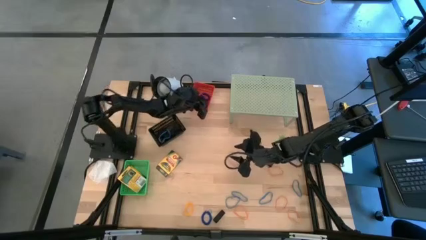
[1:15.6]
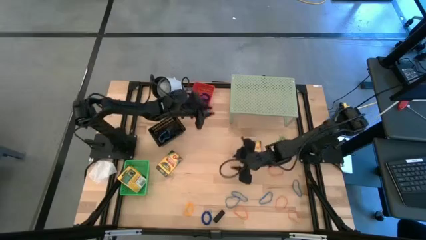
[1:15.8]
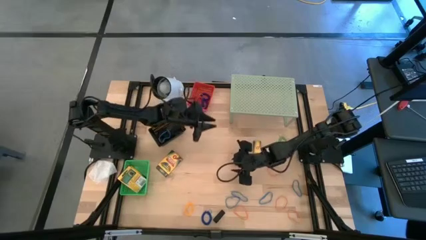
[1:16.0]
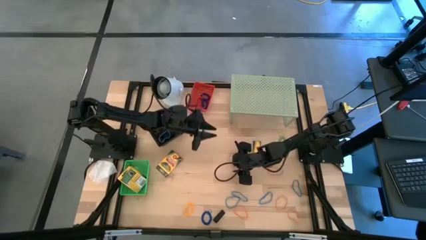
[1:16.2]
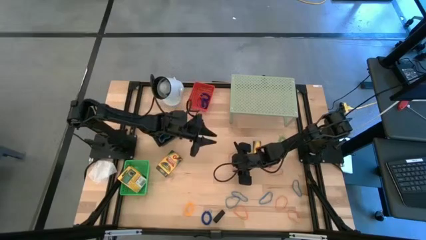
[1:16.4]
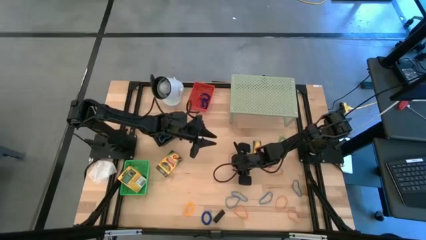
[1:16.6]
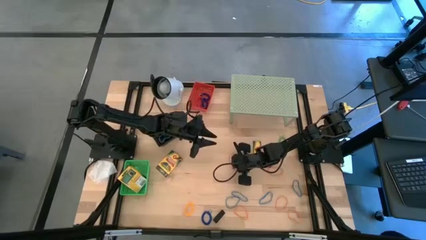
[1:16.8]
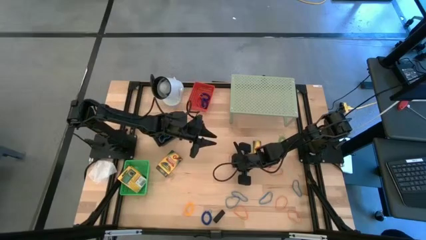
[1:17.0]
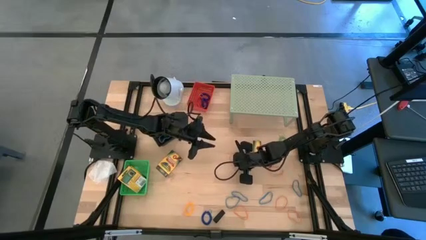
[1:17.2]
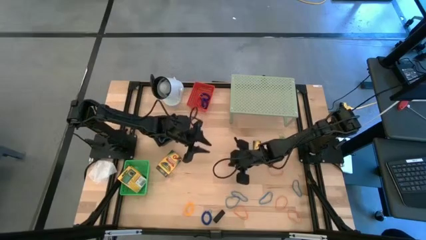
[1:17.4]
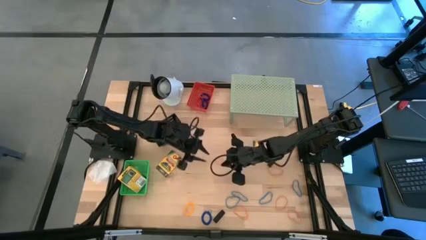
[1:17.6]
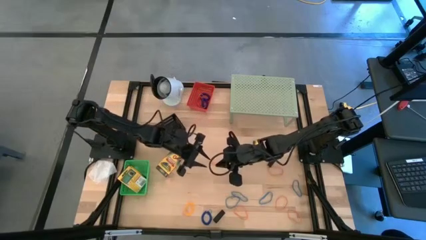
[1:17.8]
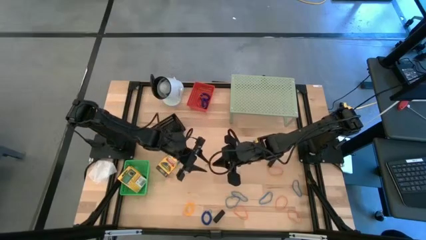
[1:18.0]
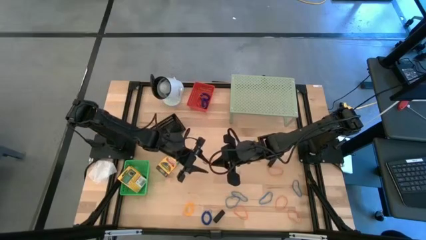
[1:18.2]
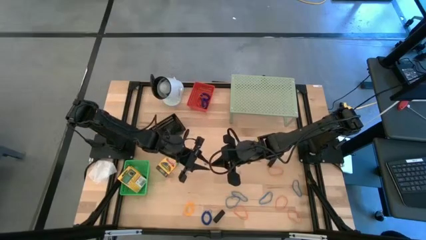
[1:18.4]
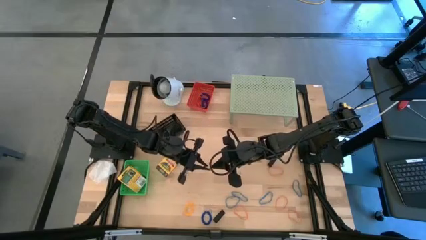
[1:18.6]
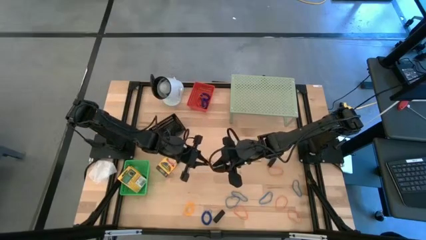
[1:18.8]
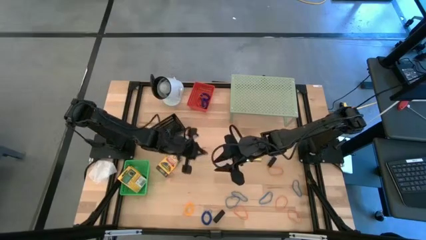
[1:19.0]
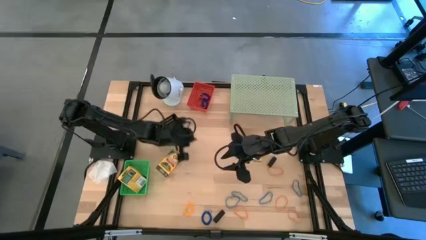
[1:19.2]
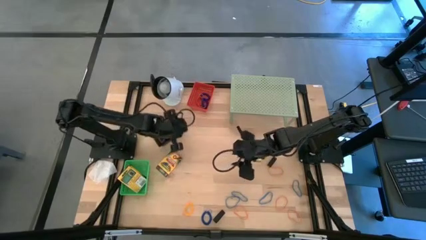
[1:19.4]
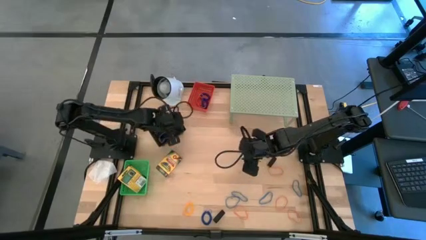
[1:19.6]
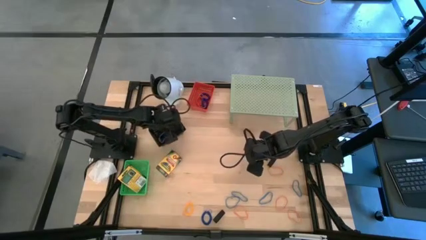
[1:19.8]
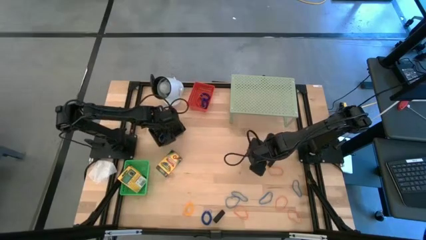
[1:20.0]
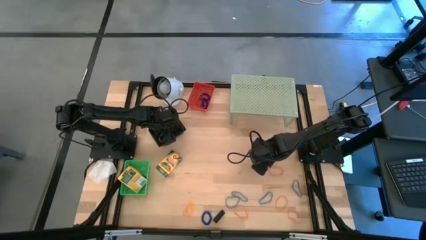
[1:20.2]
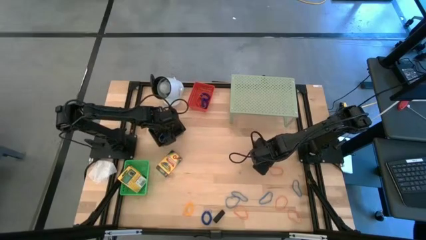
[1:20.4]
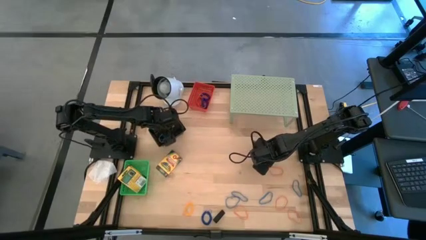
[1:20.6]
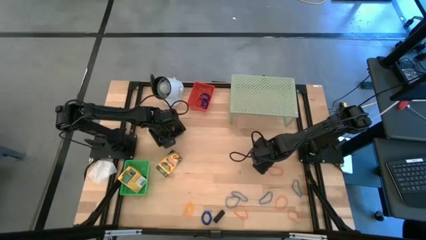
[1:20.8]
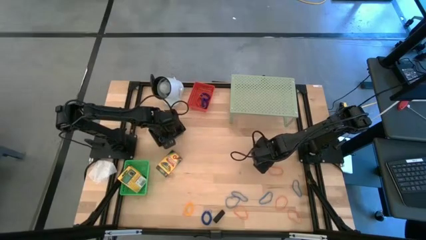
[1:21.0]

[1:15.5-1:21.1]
Task: Pick & Place Office Desk Supplies
Put the orange rubber band into the black bin

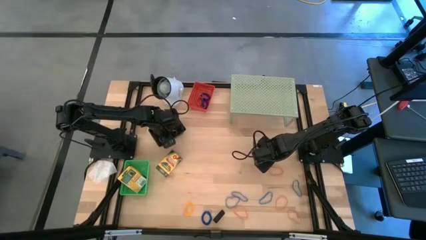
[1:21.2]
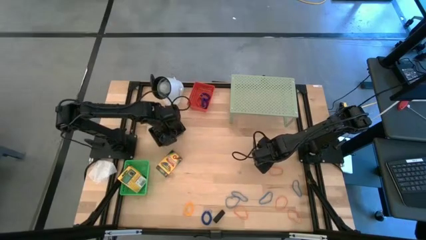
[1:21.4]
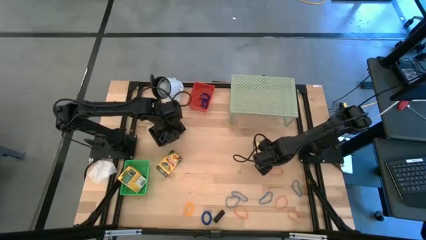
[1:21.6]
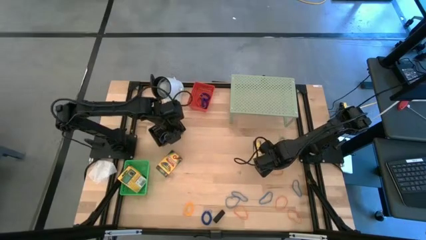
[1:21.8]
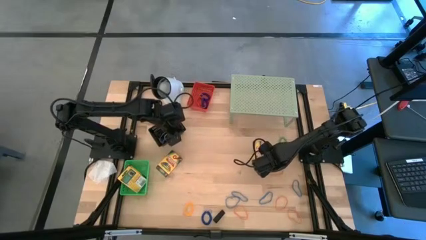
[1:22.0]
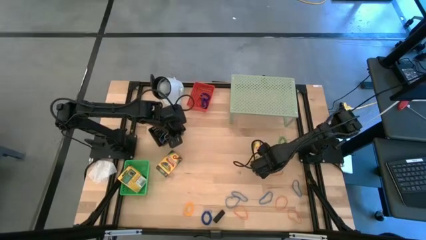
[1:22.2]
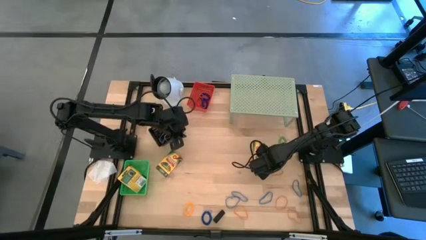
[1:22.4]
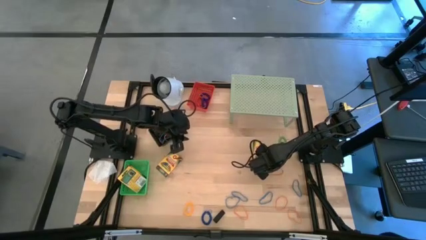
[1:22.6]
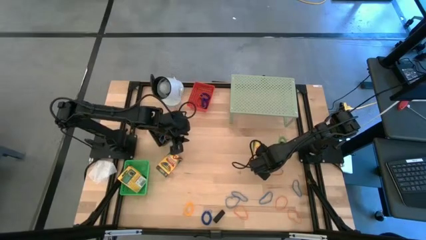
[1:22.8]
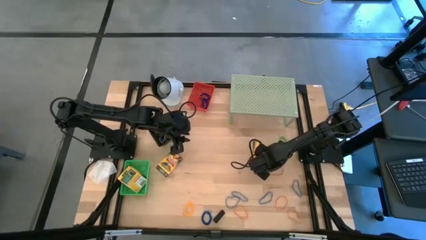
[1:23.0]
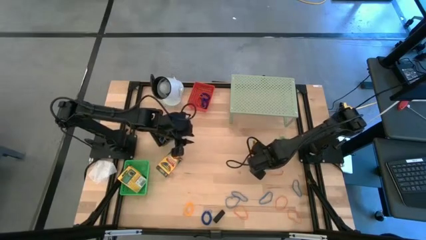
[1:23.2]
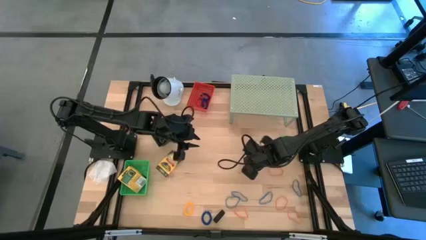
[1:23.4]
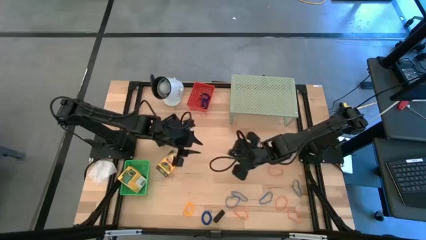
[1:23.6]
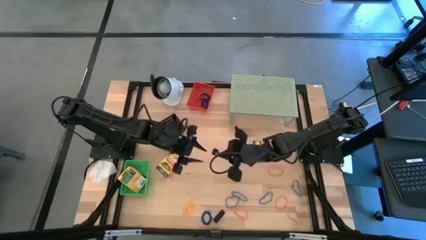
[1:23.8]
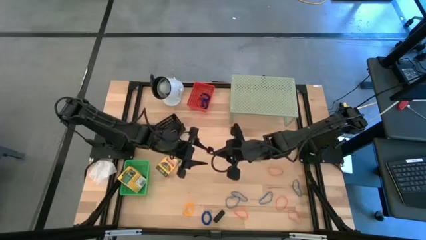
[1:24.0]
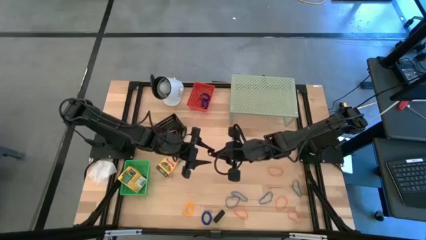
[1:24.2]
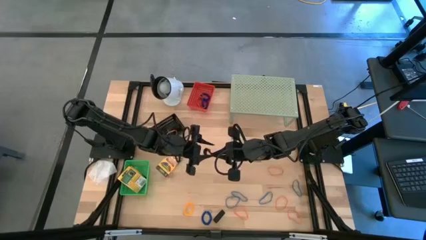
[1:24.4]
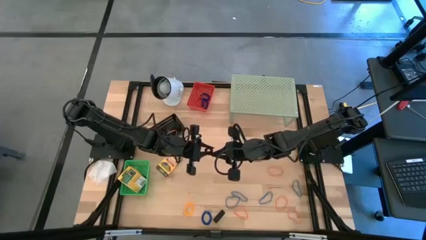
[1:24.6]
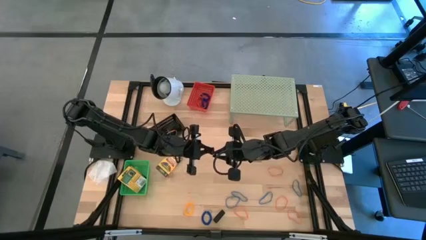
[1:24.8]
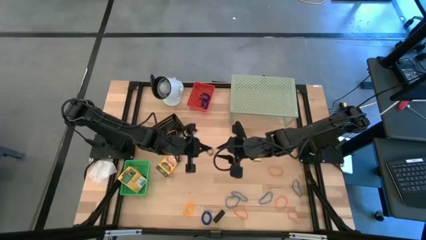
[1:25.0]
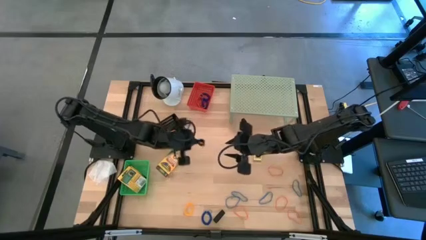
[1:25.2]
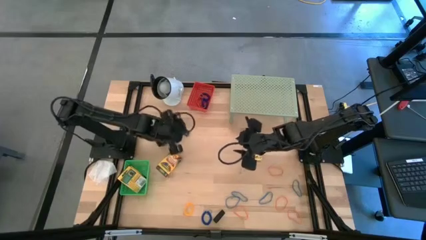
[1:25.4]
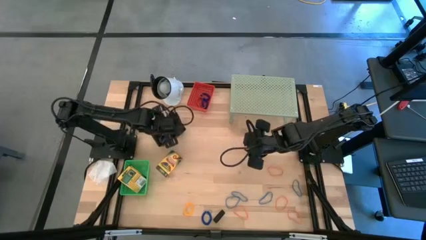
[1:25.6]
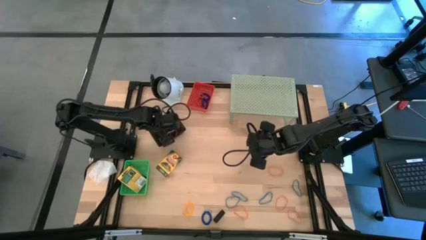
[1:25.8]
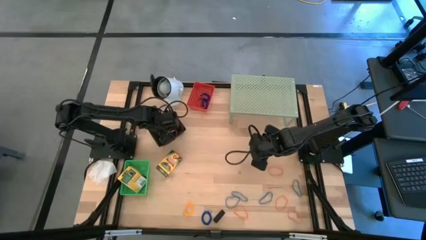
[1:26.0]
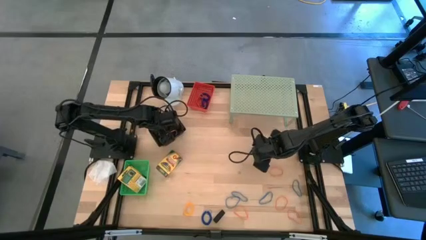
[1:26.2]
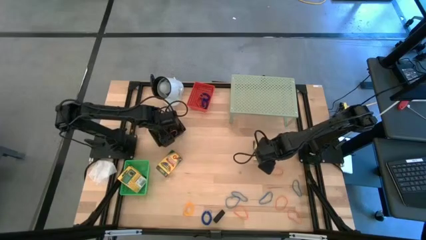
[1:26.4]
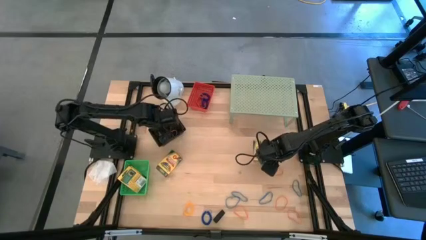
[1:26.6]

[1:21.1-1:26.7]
Put the black rubber band into the black bin

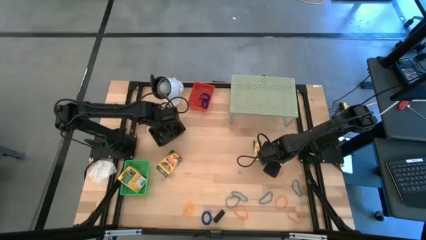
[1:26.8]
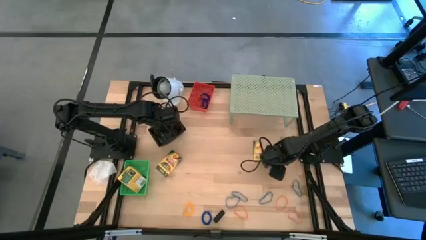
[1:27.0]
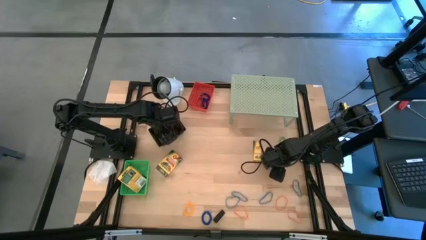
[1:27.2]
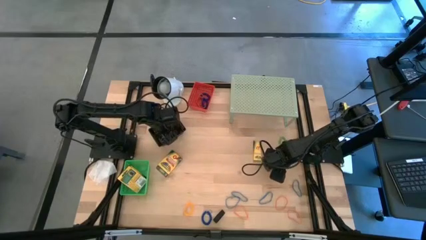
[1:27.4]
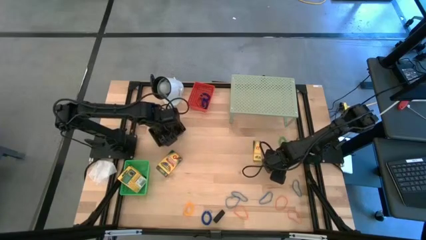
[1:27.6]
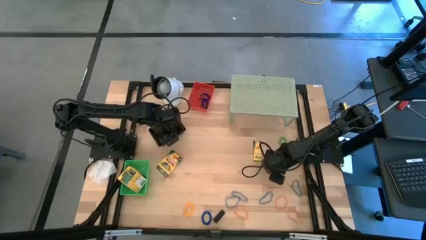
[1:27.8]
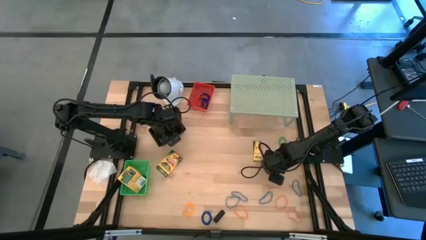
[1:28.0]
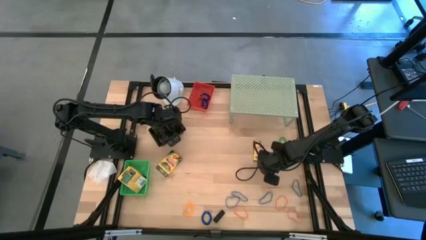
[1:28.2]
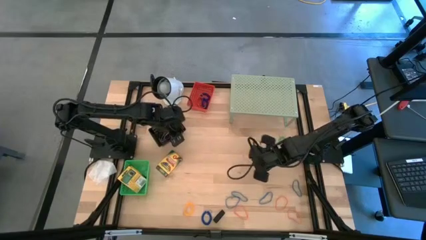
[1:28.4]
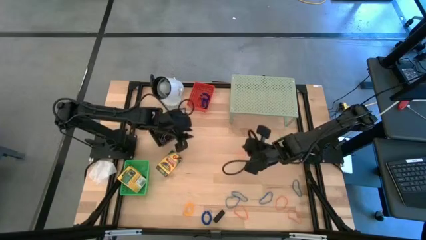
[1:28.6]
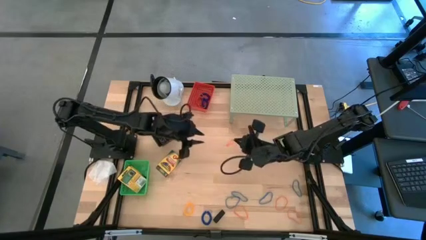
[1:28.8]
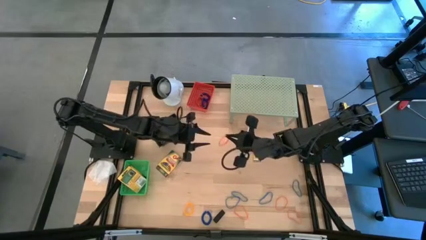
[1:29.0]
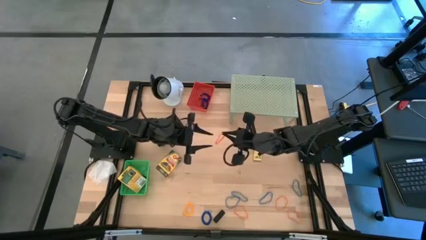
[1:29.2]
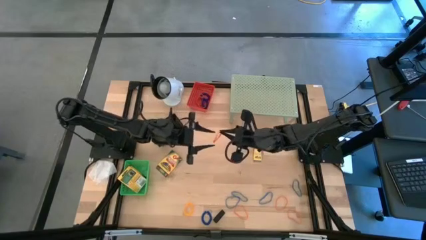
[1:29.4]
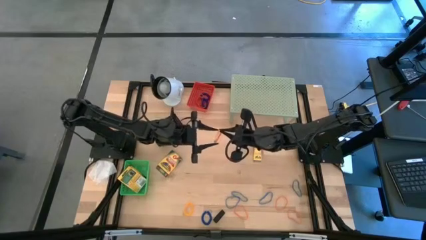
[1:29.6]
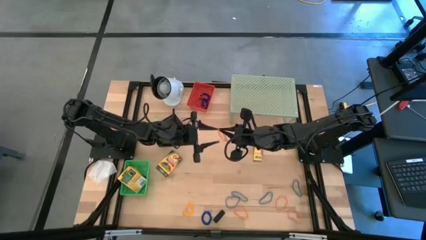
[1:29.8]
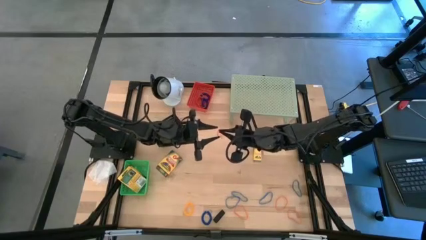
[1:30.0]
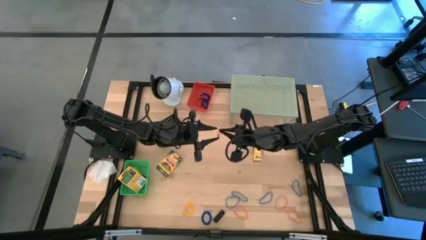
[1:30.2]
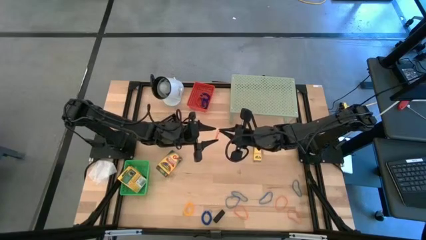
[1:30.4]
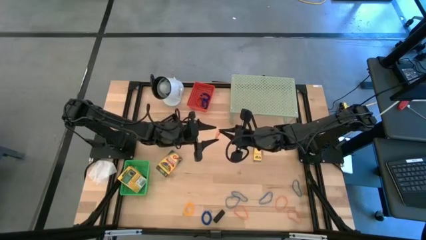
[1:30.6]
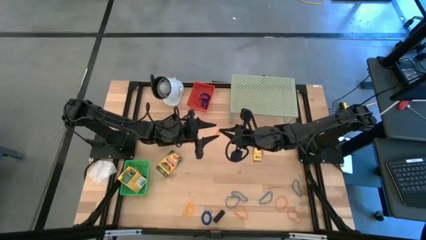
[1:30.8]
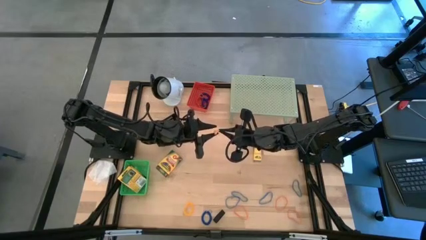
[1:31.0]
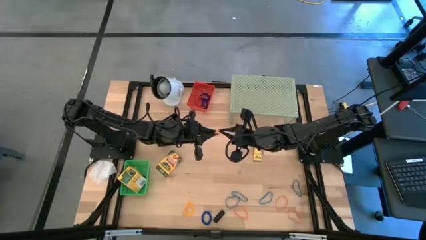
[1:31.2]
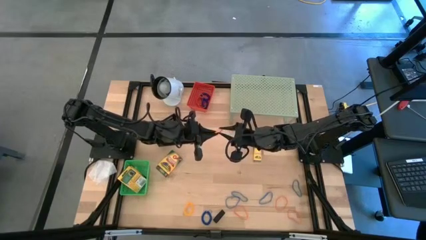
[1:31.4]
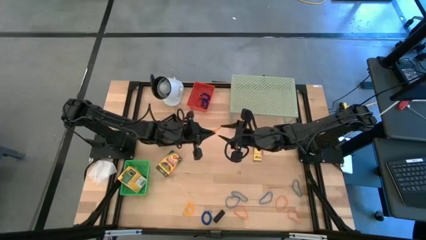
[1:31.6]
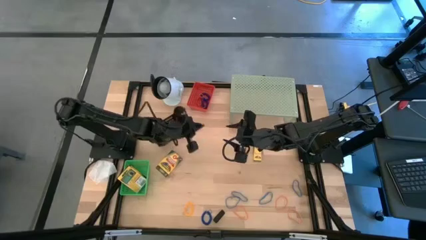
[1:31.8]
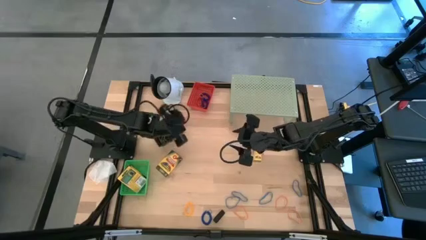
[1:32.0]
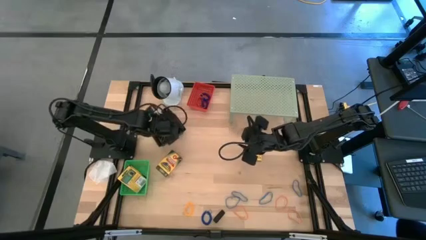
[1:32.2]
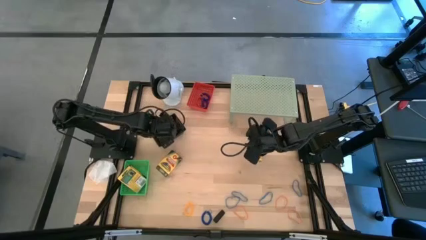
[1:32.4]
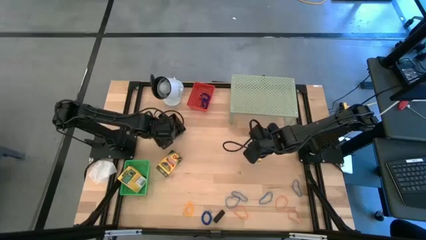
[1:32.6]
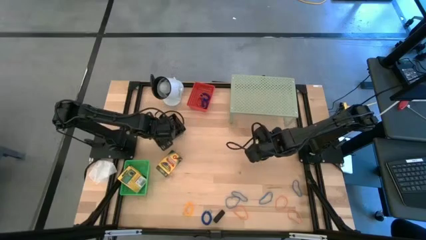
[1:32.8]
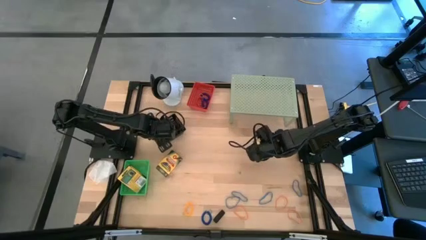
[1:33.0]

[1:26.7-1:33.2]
Put the orange rubber band into the black bin
